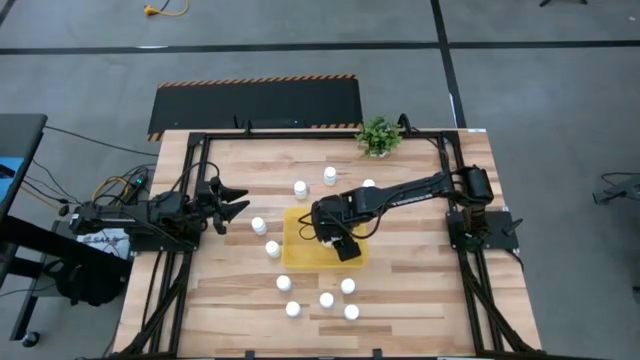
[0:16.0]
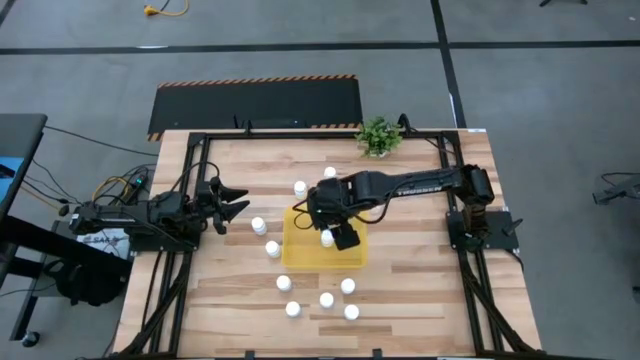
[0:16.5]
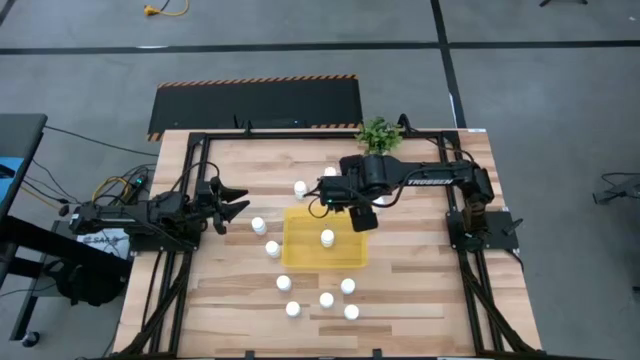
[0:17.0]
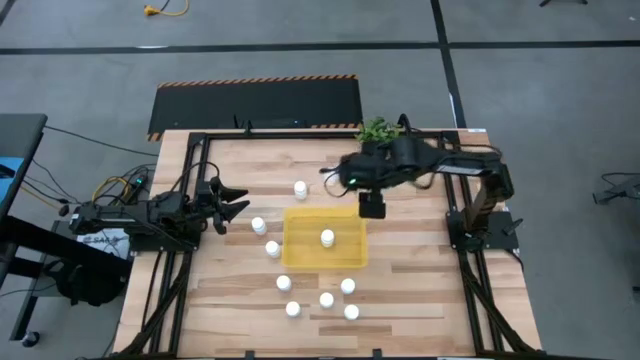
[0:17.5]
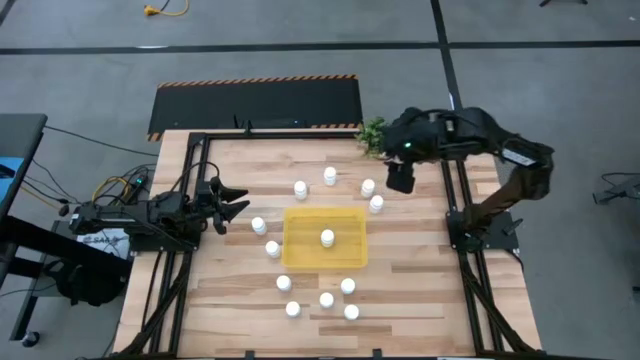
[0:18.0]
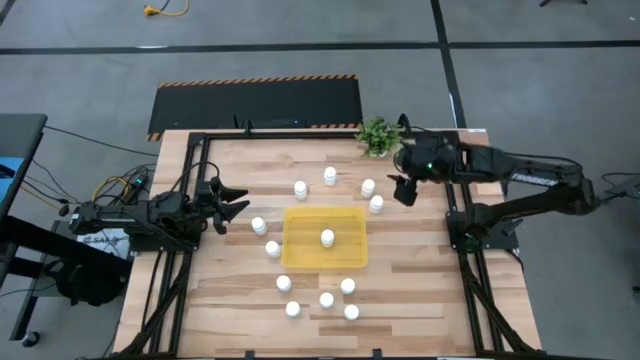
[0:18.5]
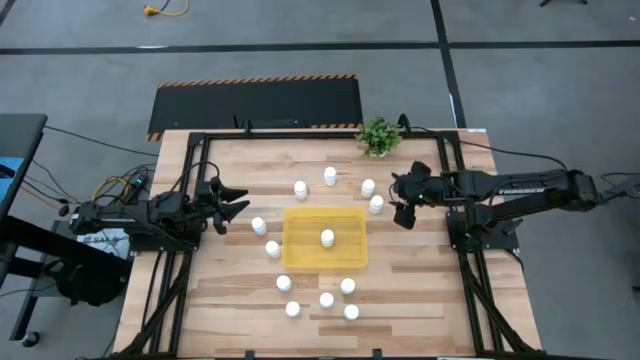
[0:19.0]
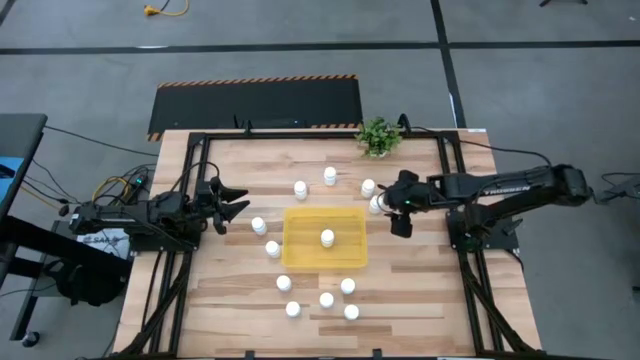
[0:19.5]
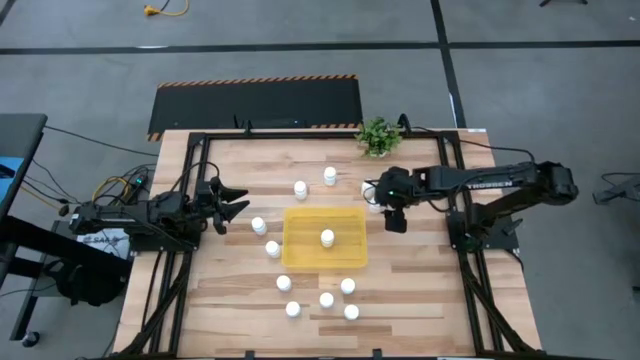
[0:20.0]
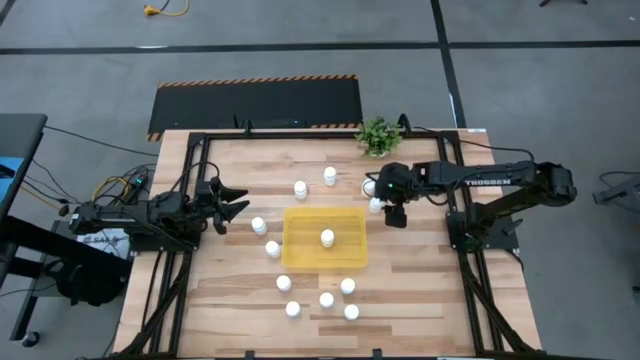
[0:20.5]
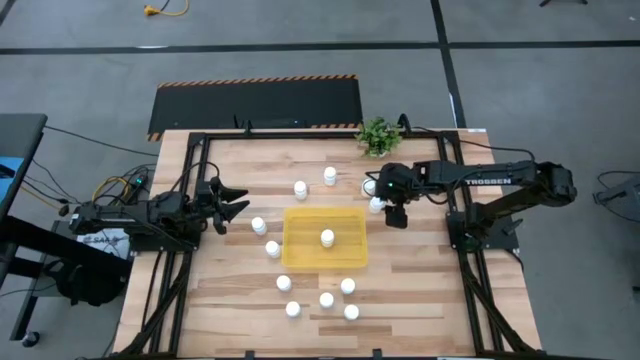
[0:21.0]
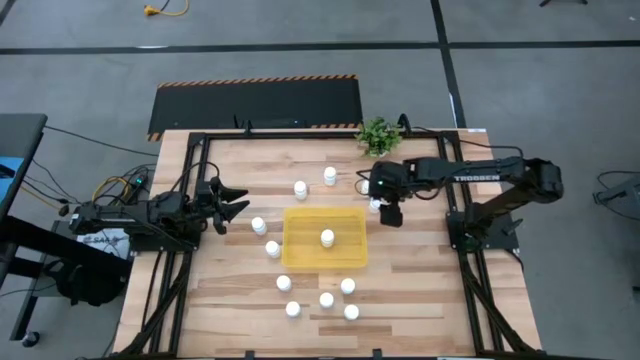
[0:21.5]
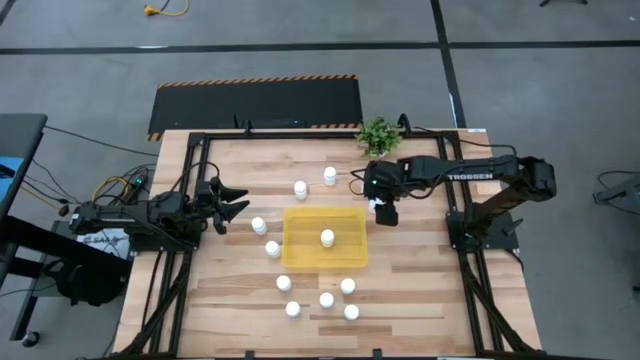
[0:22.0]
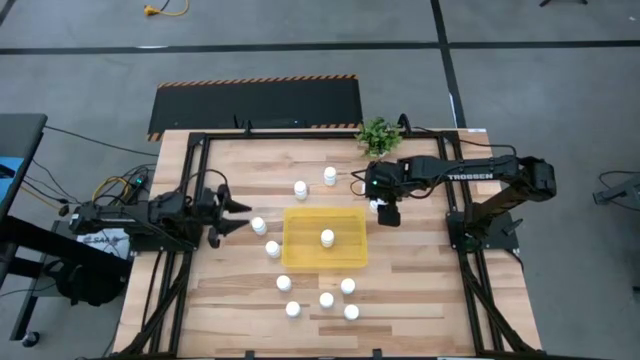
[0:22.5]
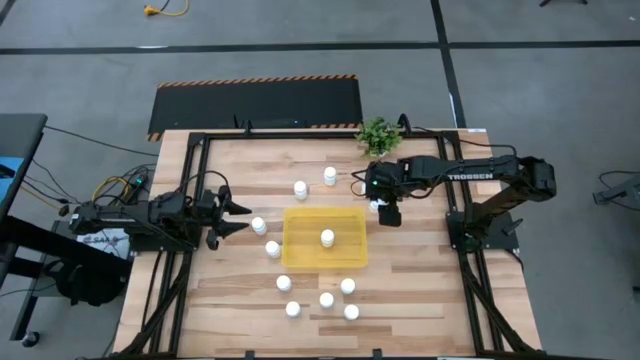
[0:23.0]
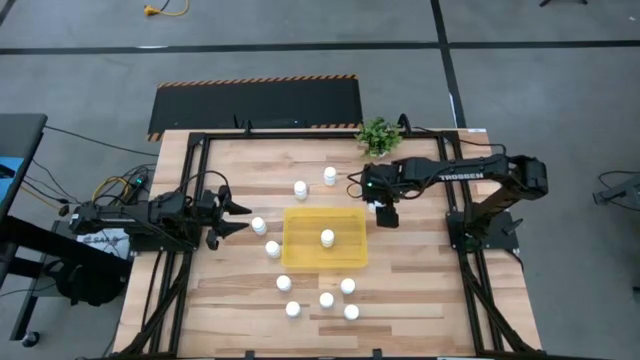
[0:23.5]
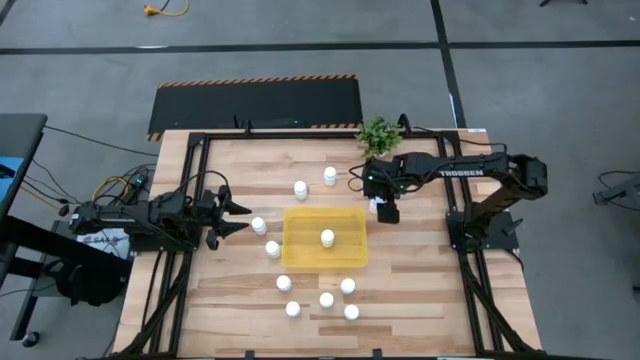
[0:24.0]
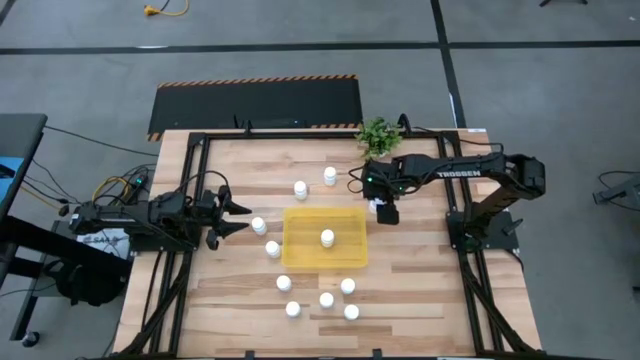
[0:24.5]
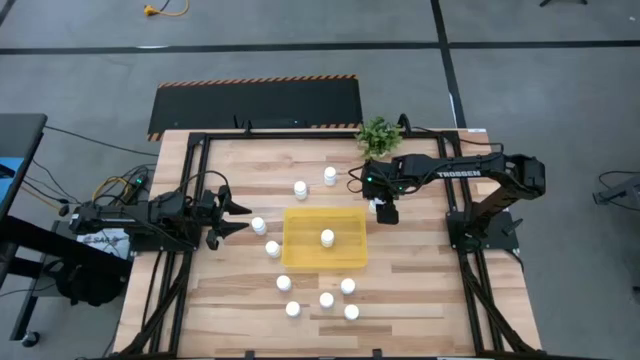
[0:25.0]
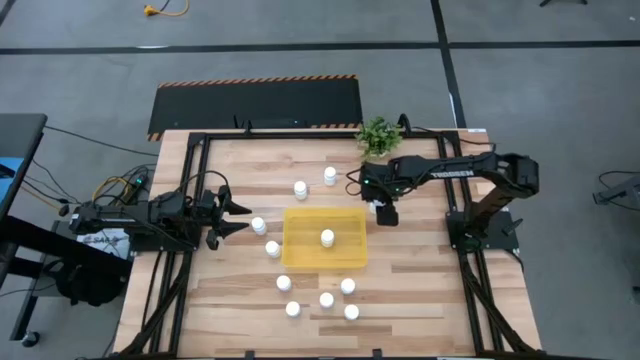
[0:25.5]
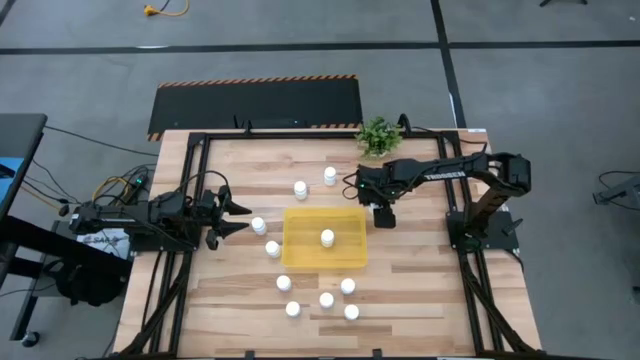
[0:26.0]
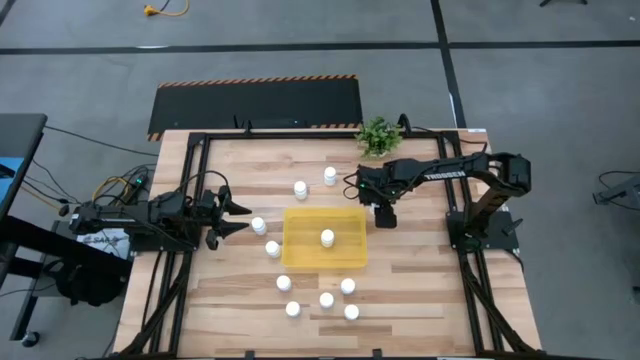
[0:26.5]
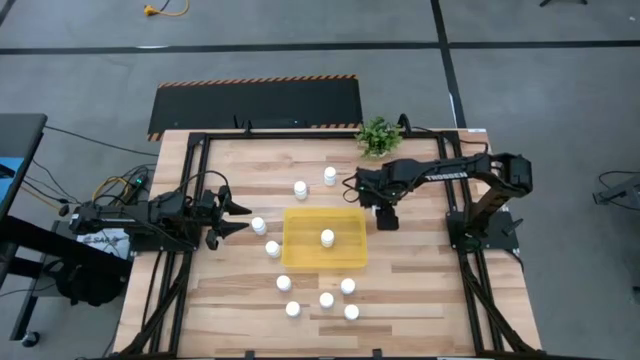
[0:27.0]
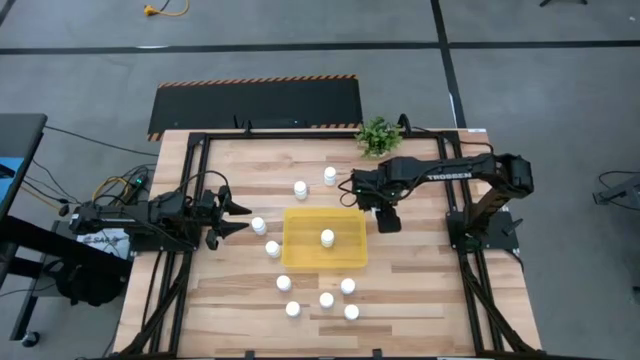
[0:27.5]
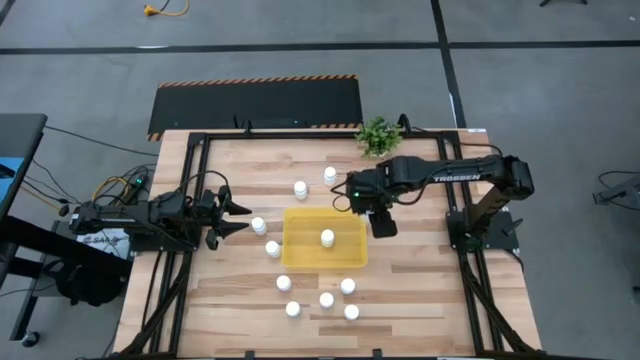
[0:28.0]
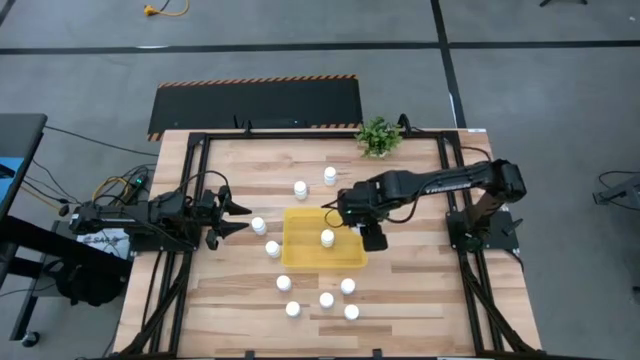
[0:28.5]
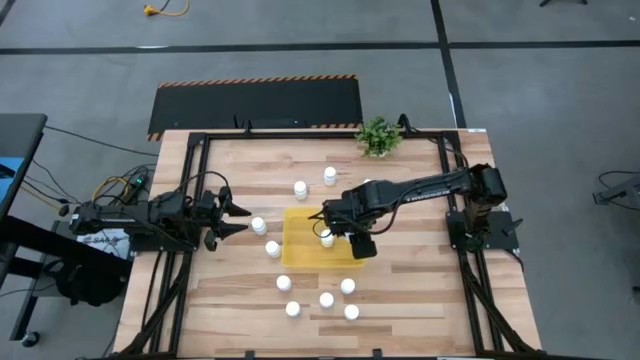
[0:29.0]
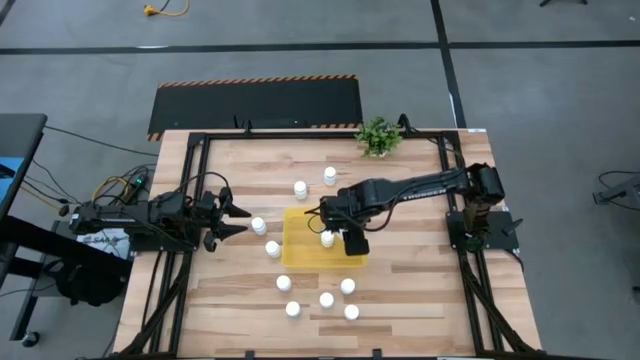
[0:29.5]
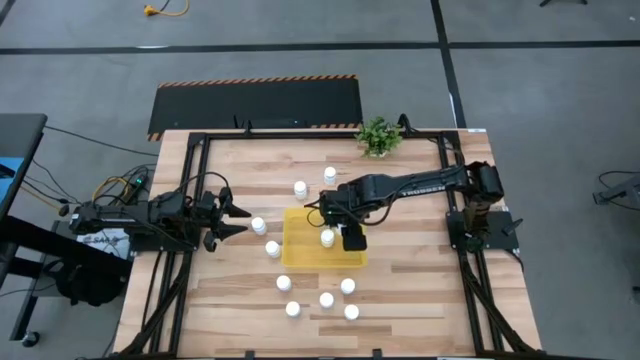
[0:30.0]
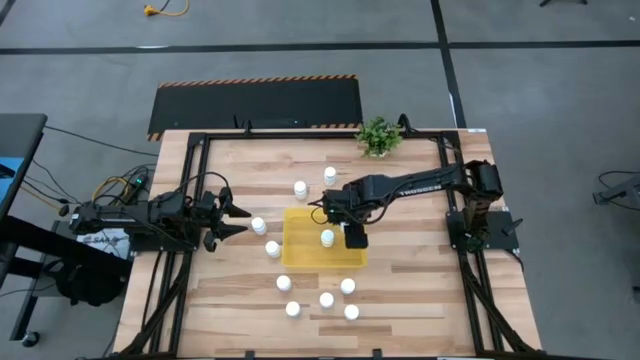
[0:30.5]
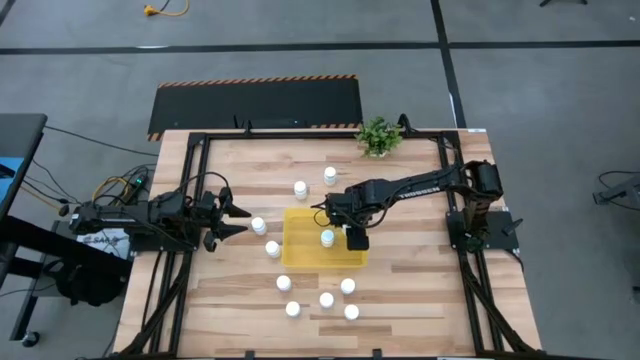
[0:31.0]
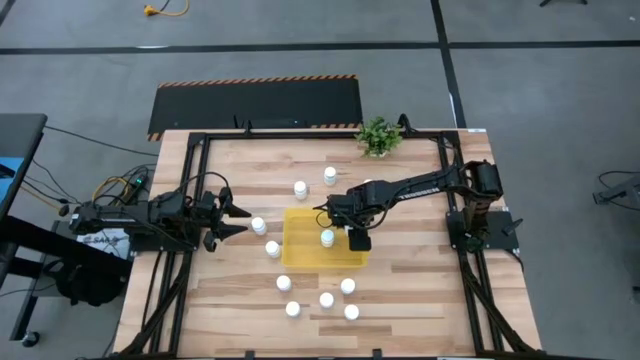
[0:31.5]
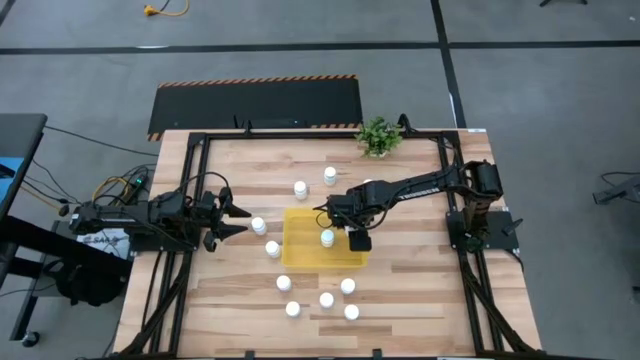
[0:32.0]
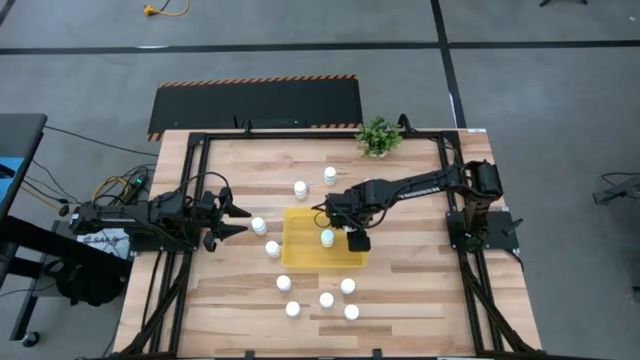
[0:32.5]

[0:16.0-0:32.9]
Task: Pick and place pill bottles into a basket
Put the white pill bottle into the yellow bin

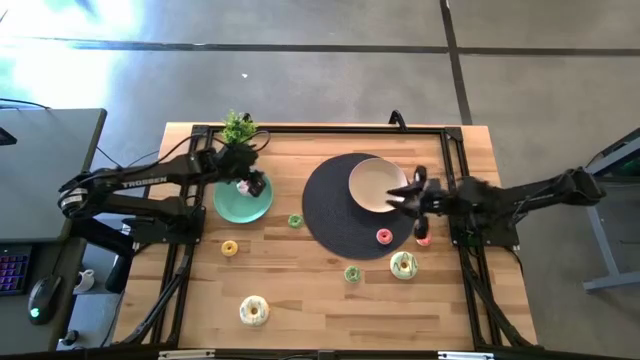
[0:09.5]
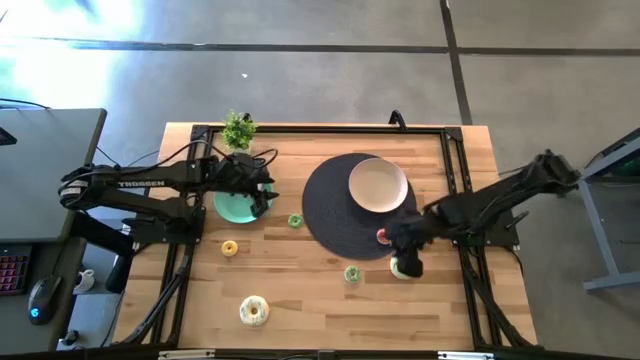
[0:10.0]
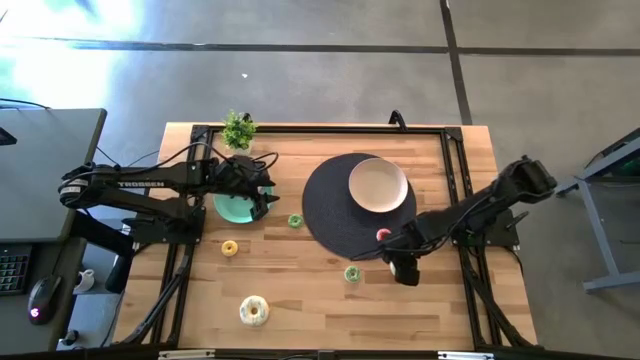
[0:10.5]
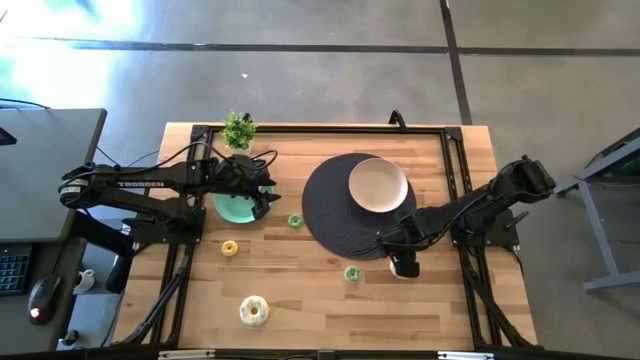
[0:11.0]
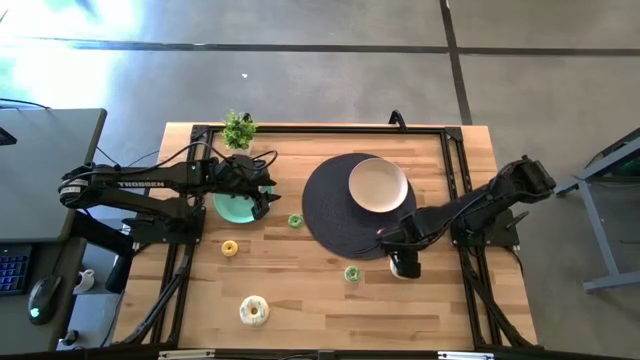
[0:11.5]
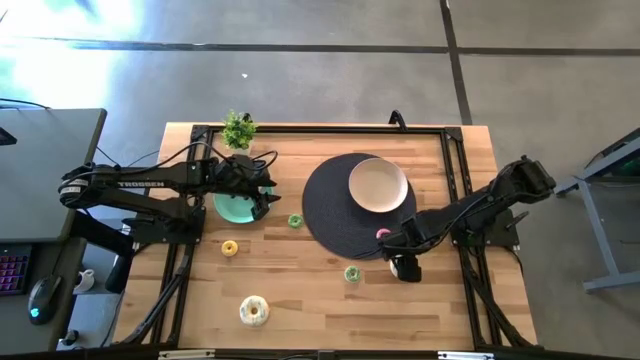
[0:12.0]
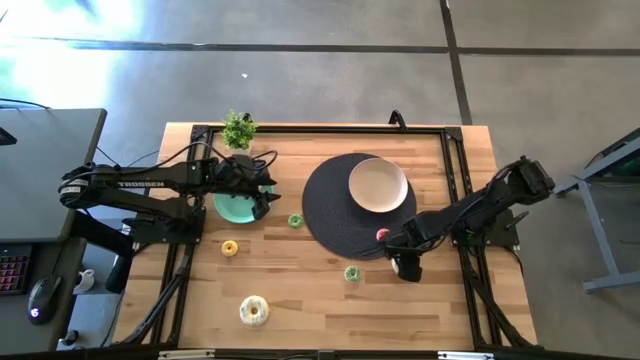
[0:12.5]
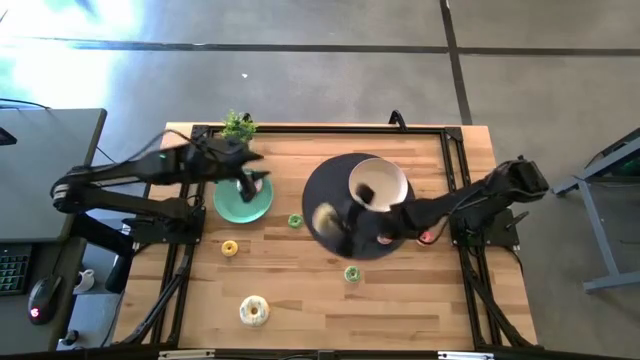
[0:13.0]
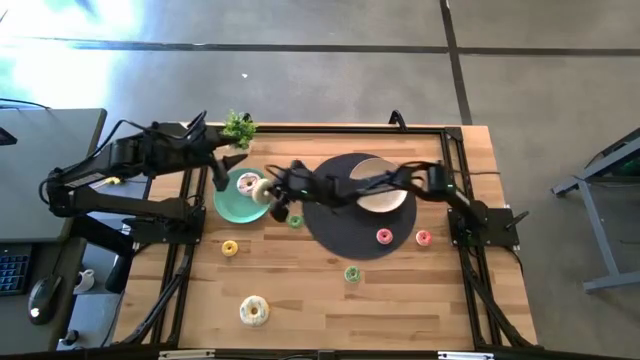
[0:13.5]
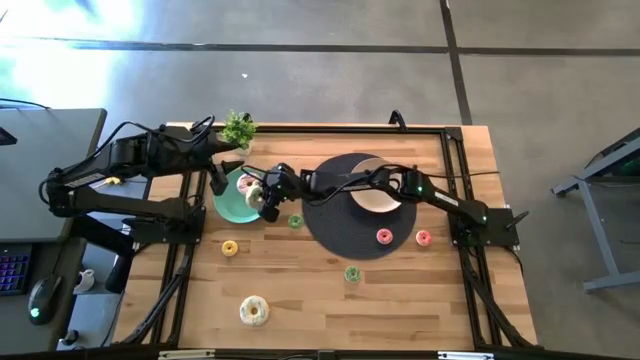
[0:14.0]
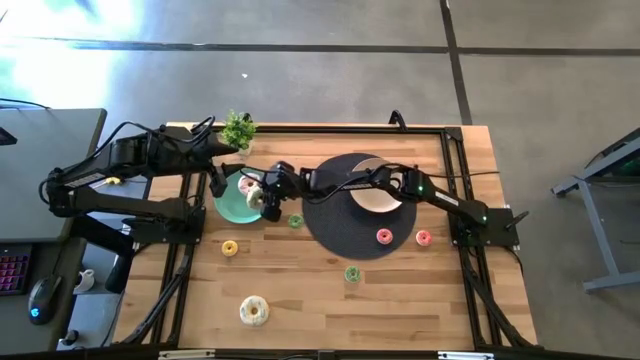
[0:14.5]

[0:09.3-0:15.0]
Task: Pick & Place donuts
Put the blue donut into the green plate
